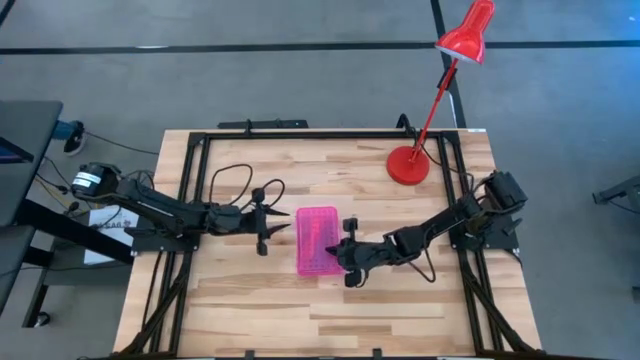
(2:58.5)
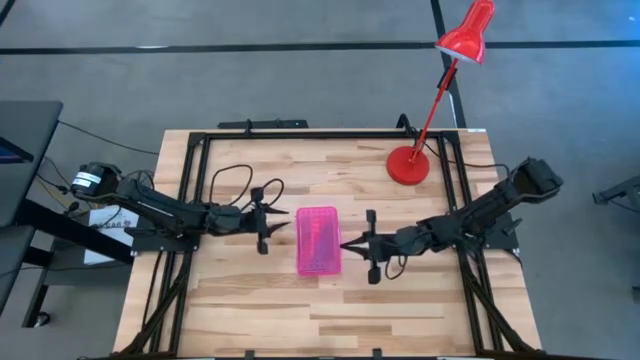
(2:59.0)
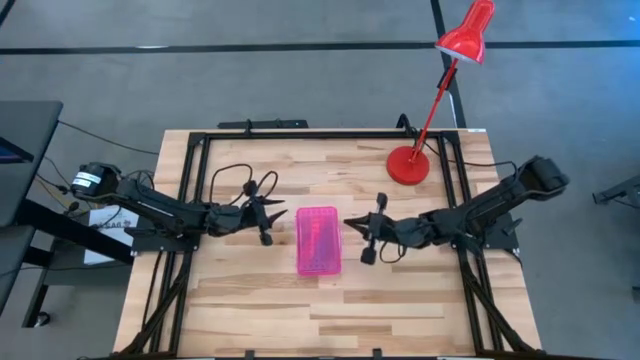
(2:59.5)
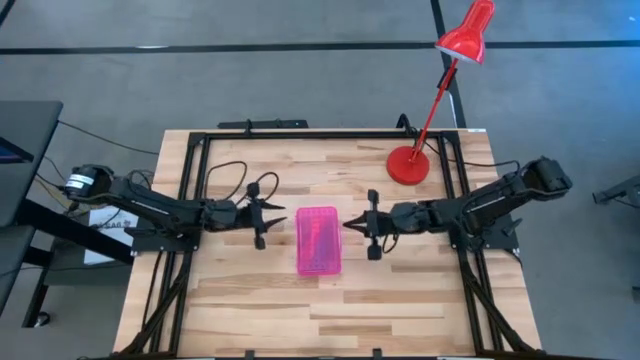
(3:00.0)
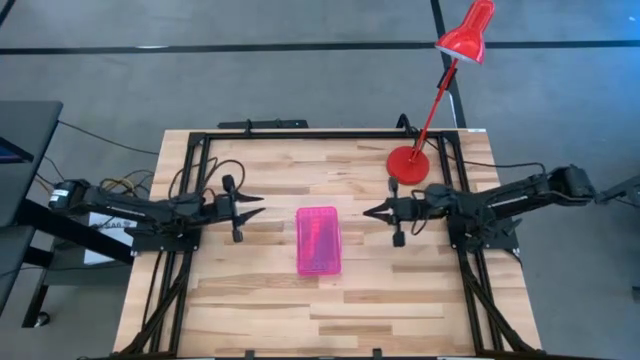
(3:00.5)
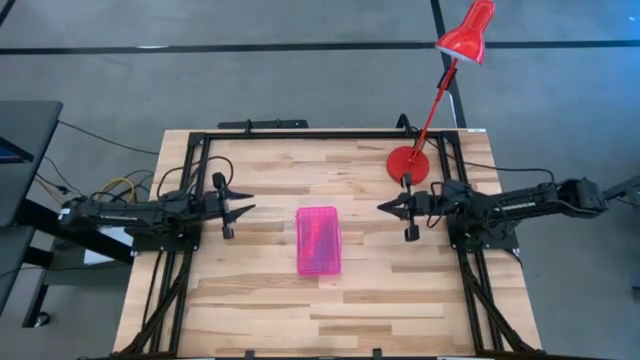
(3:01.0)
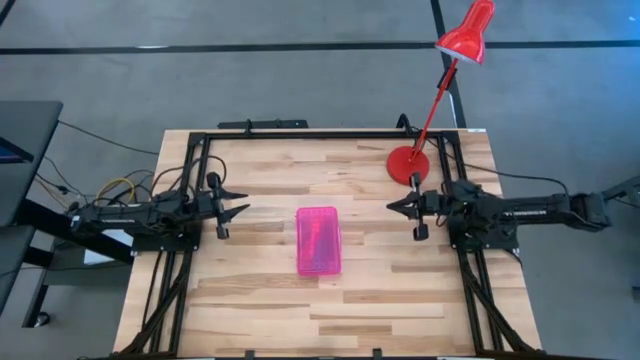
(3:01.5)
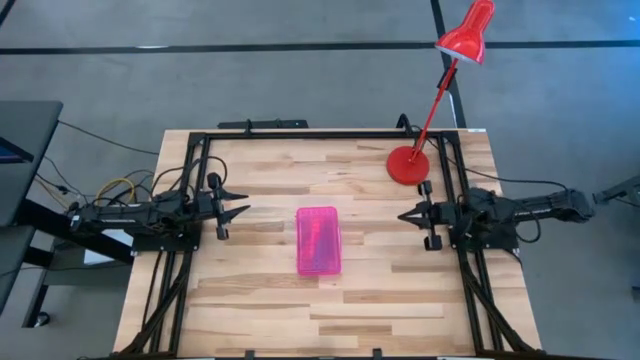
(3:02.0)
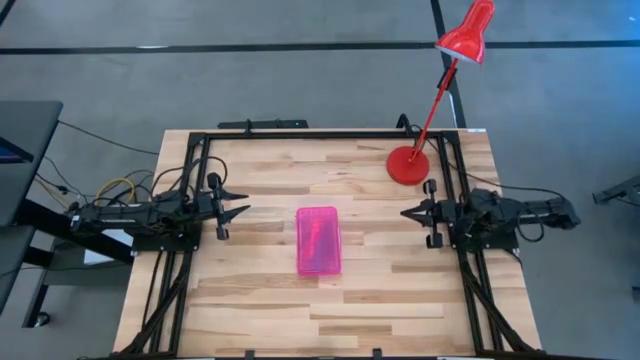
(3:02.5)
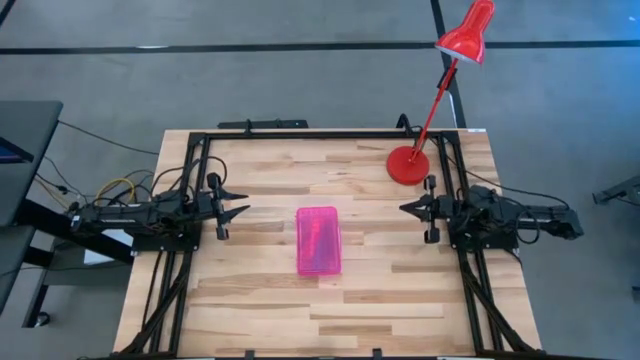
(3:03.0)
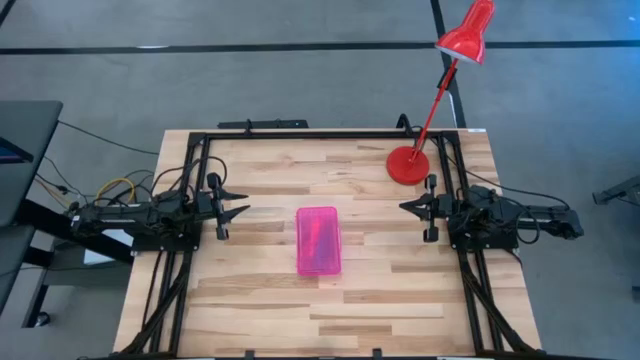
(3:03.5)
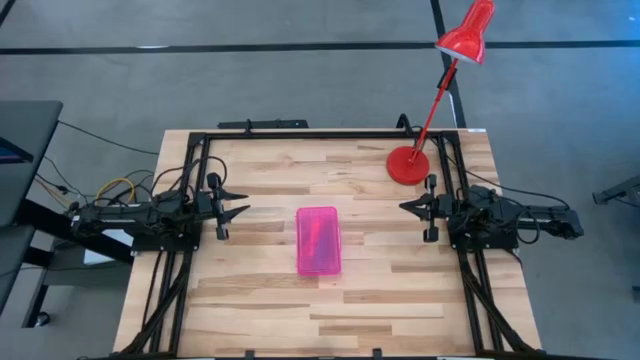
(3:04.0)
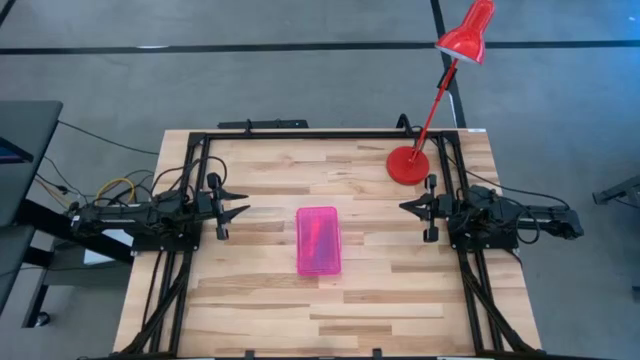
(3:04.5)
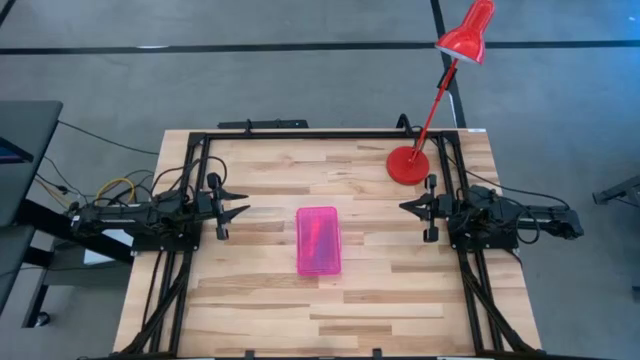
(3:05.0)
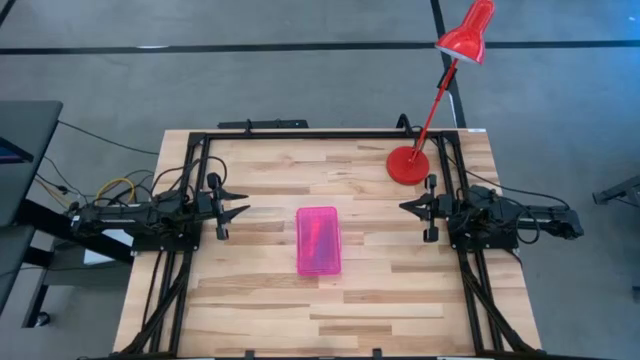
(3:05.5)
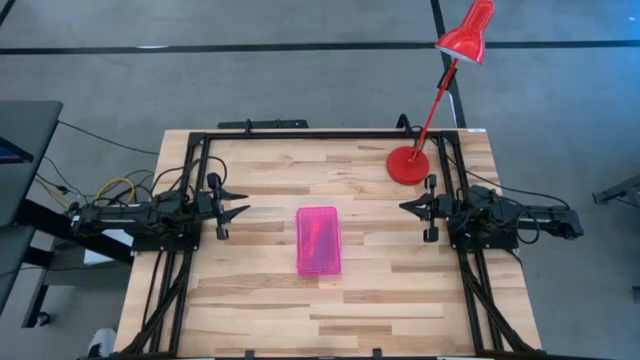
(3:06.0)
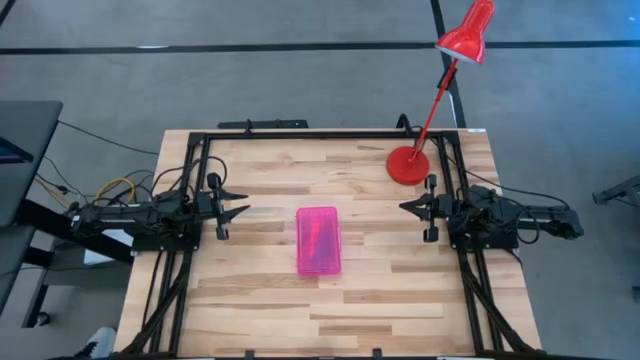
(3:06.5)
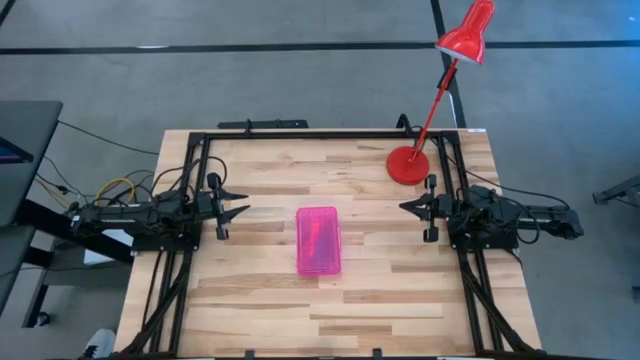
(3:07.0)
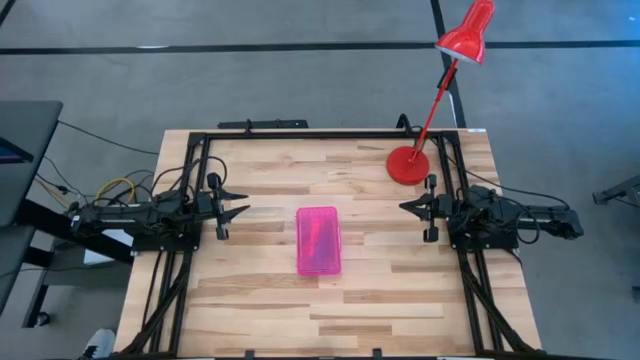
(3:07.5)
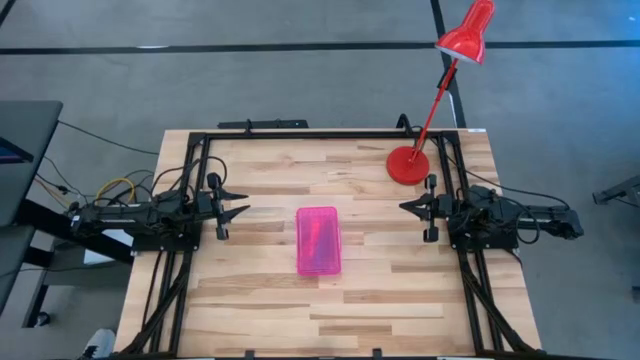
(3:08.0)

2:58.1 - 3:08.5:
Task: Pick & place school supplies into a supply box
Return to Home Position

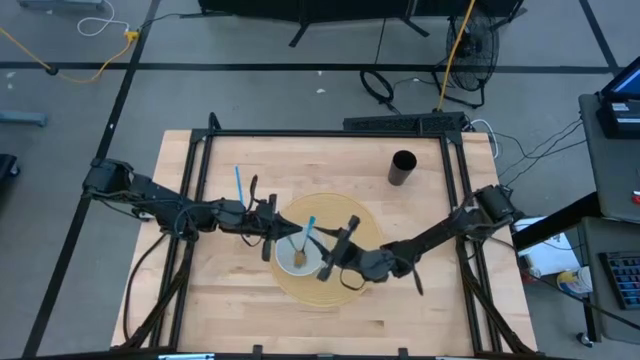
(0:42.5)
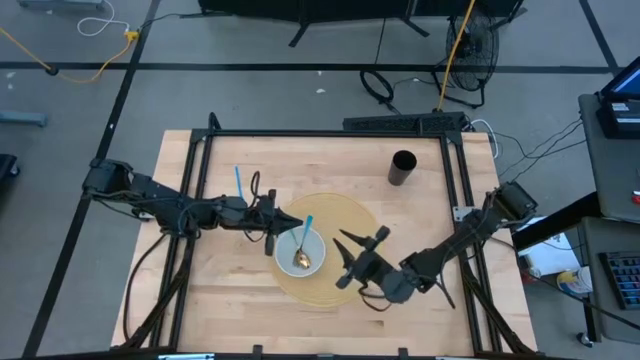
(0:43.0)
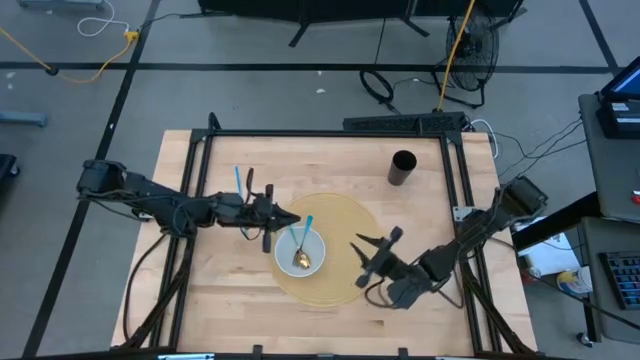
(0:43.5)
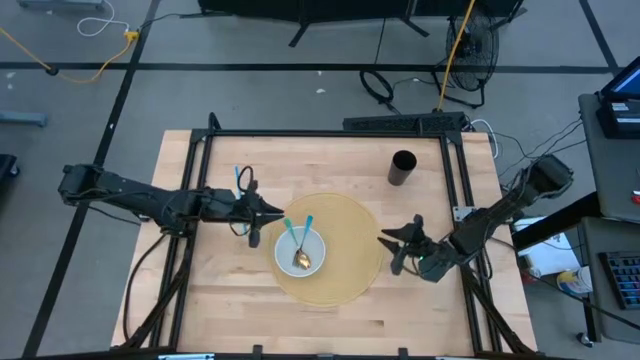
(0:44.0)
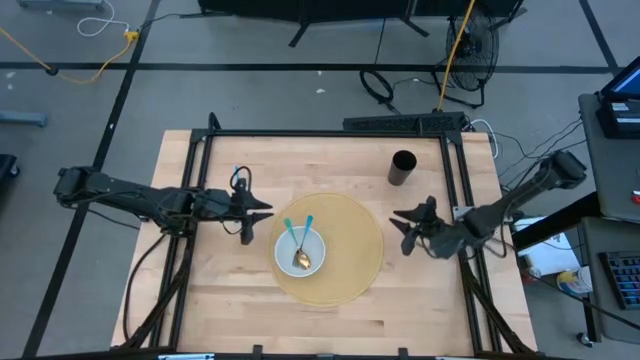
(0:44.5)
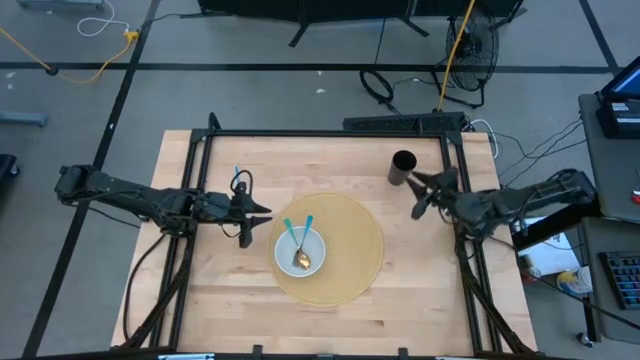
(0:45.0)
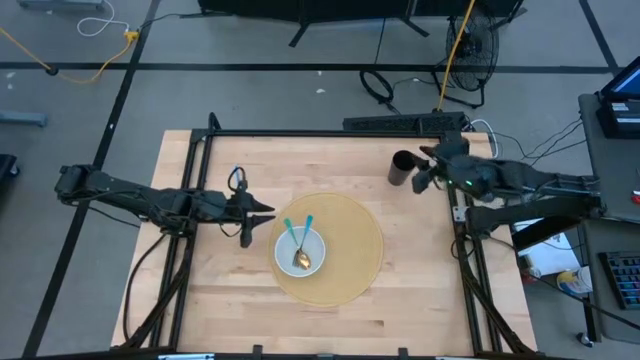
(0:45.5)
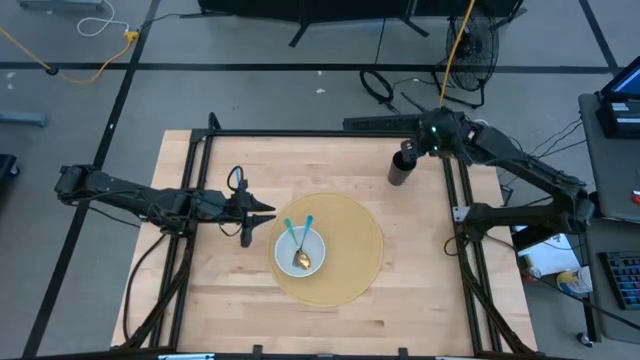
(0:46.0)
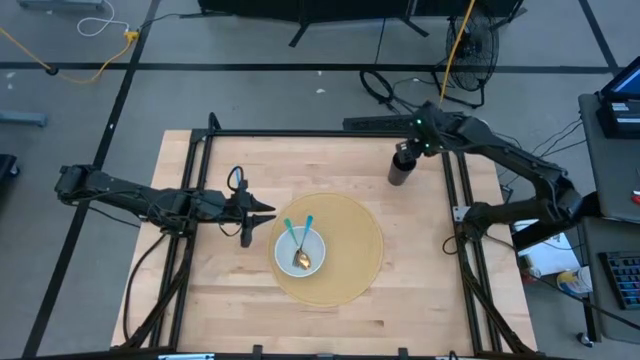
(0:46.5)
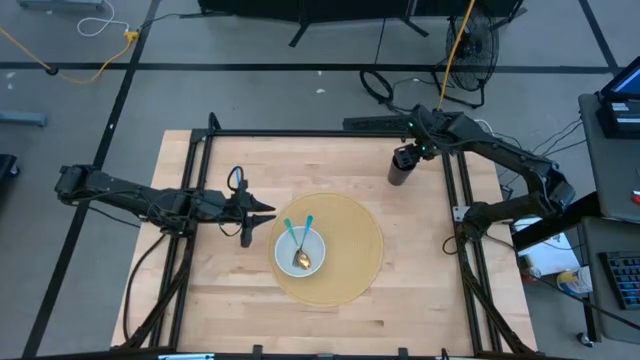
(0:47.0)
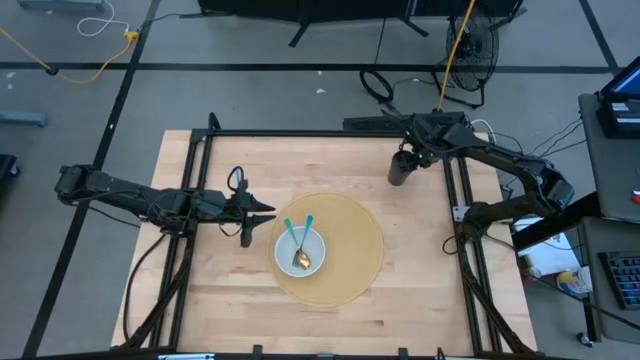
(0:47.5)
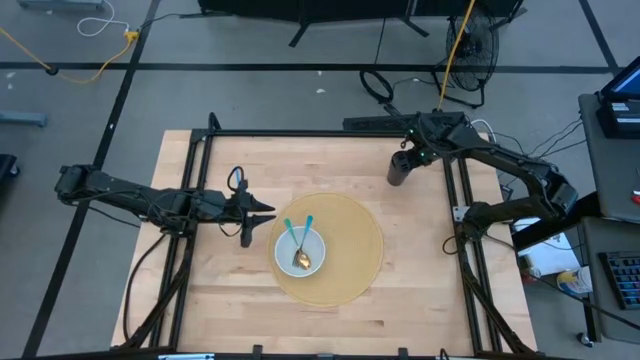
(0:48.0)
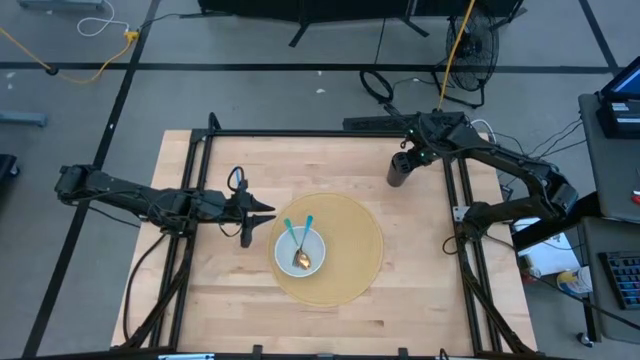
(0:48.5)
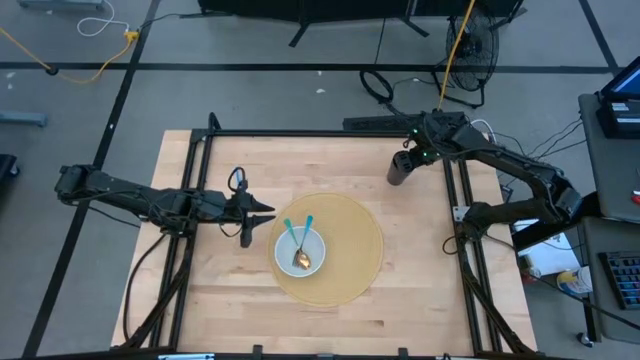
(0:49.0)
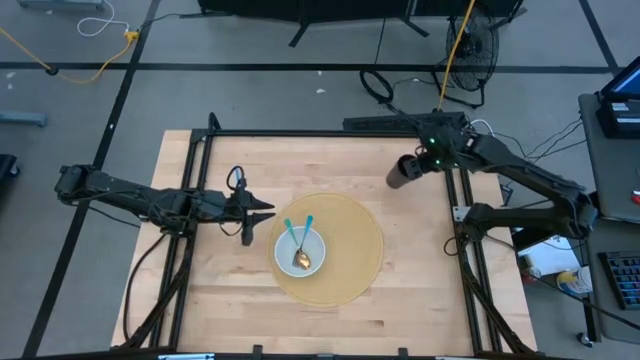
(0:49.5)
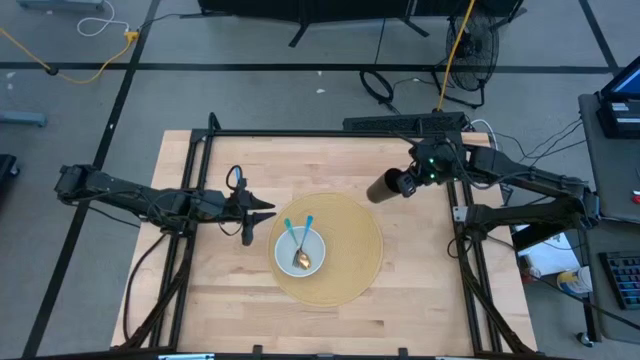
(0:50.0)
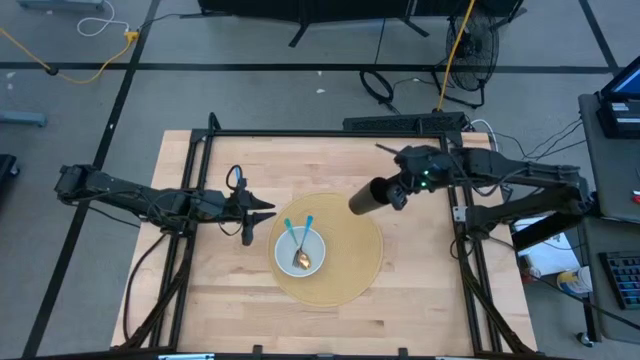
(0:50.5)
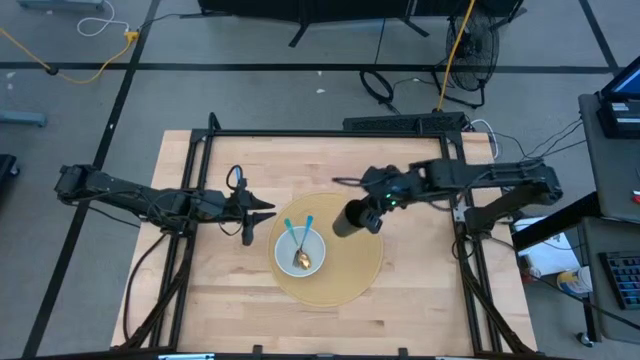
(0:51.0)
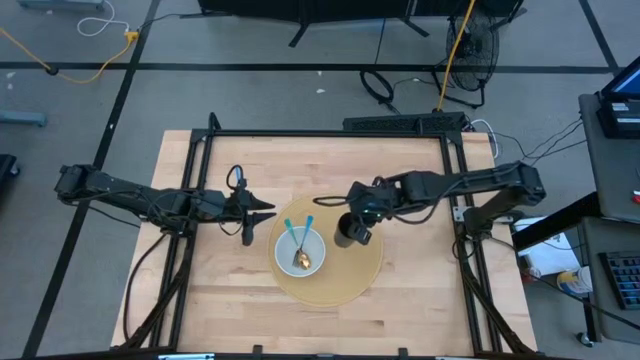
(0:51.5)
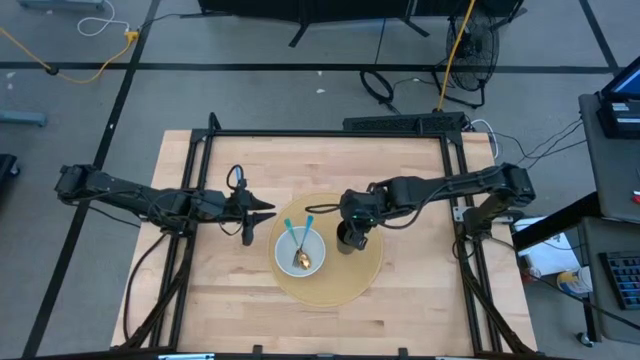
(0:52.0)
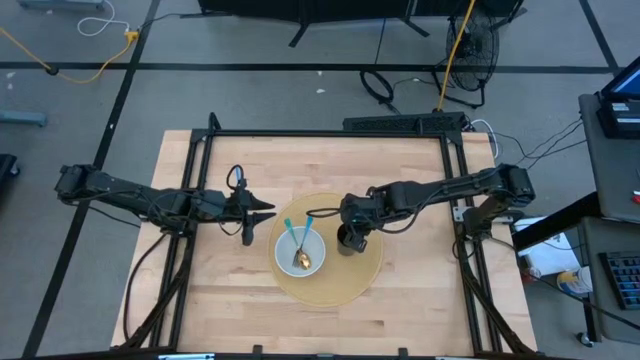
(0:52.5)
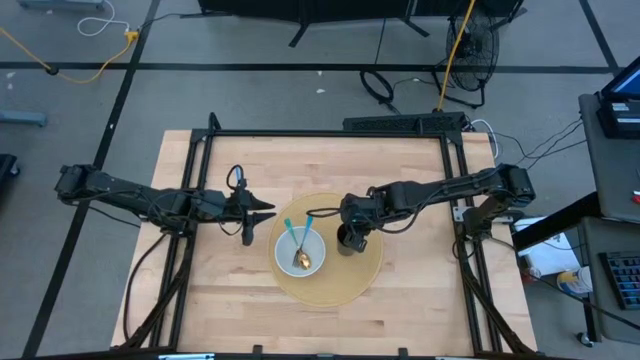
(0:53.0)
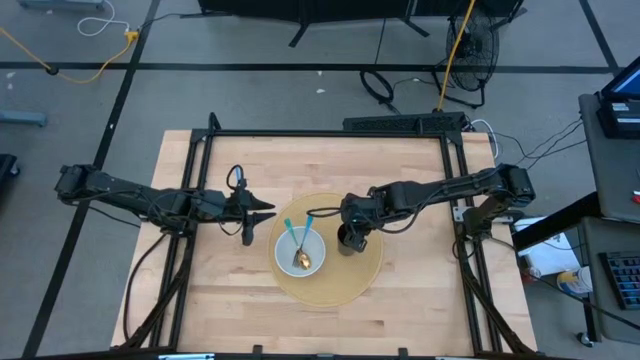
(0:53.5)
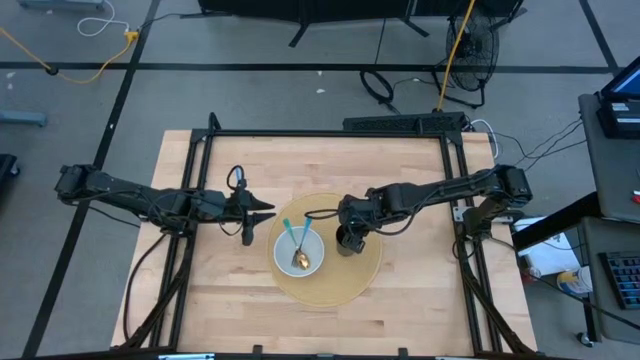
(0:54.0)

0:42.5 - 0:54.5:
Task: Pick & Place Utensil
Put the black cup on the brown mat to the right of the white bowl
